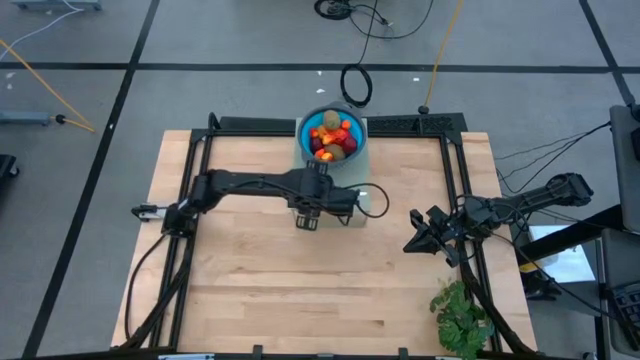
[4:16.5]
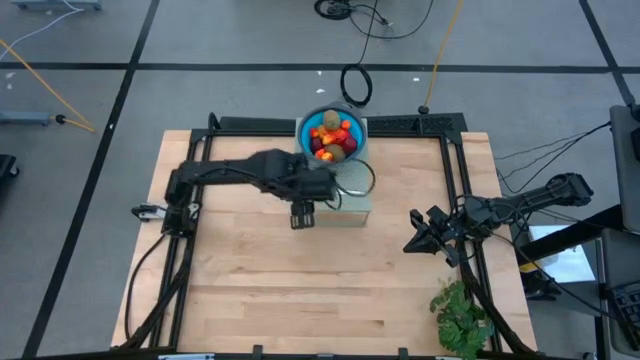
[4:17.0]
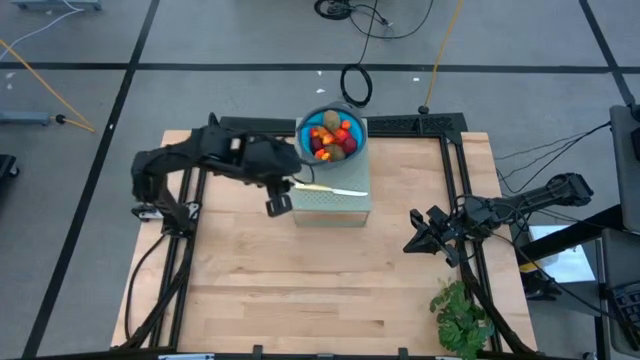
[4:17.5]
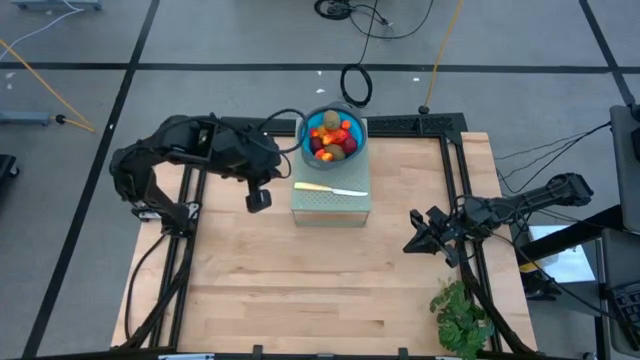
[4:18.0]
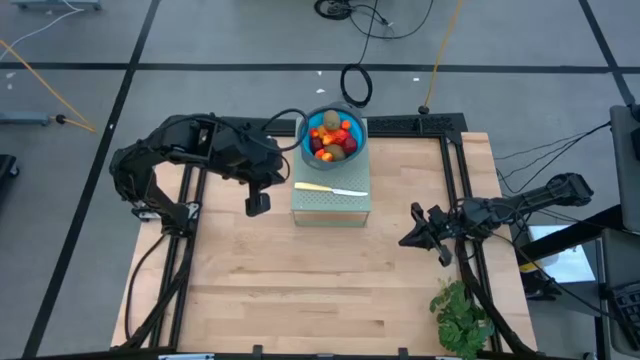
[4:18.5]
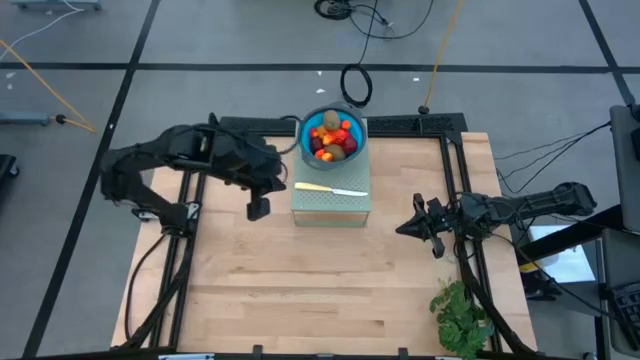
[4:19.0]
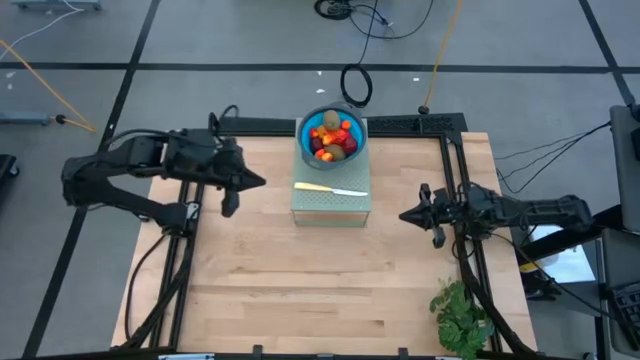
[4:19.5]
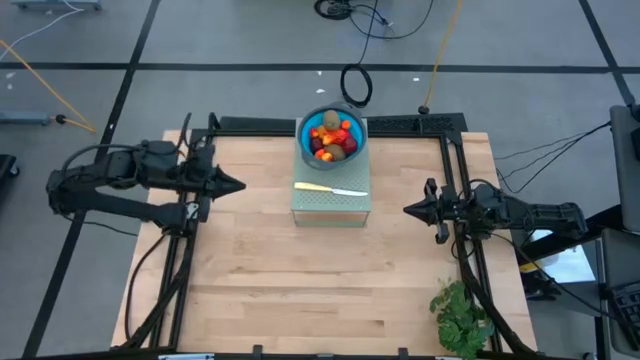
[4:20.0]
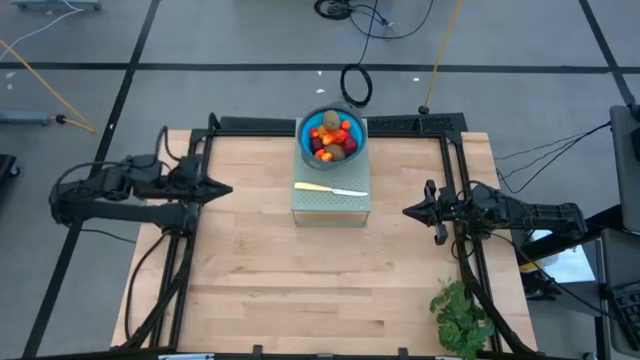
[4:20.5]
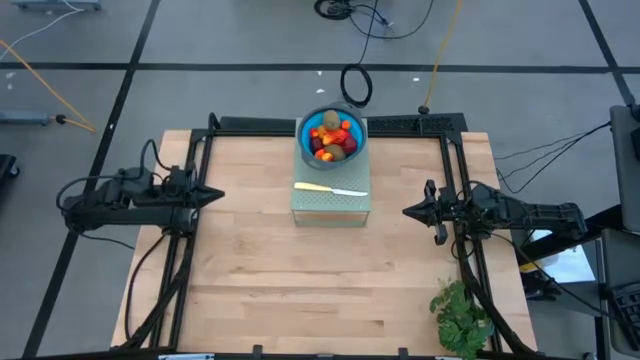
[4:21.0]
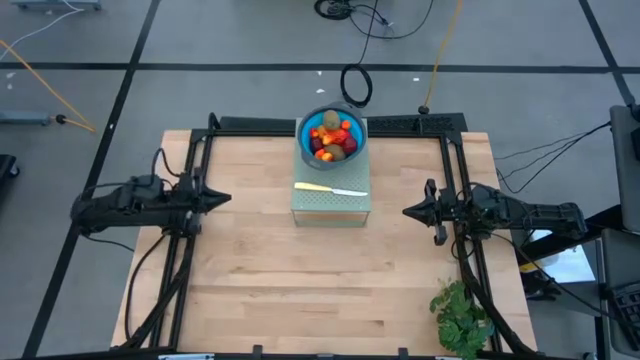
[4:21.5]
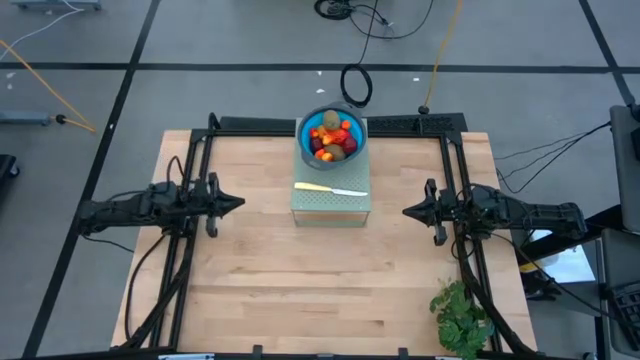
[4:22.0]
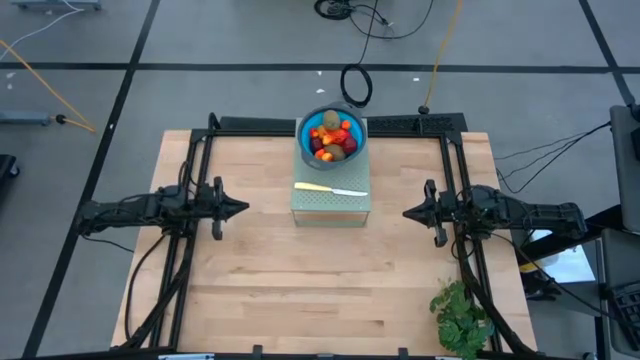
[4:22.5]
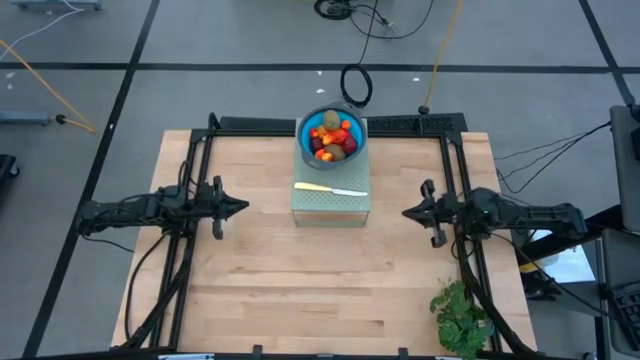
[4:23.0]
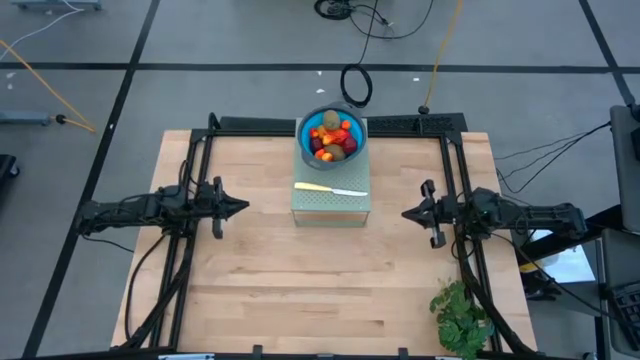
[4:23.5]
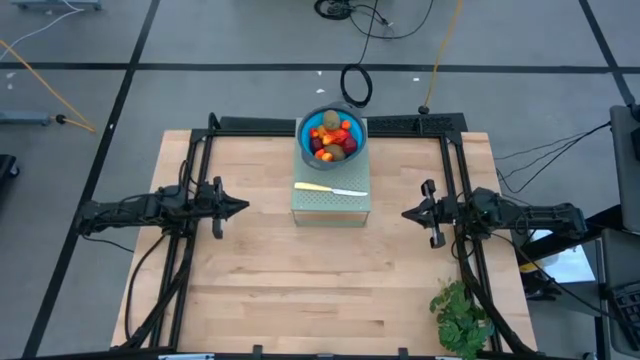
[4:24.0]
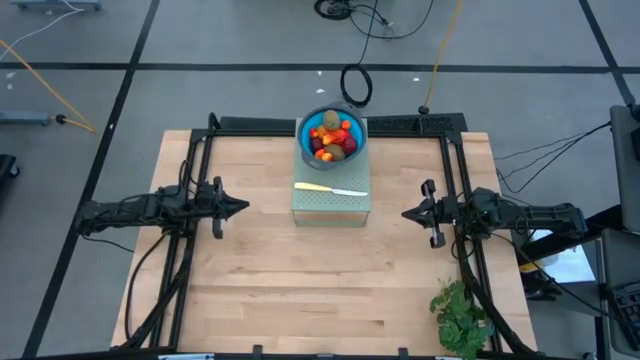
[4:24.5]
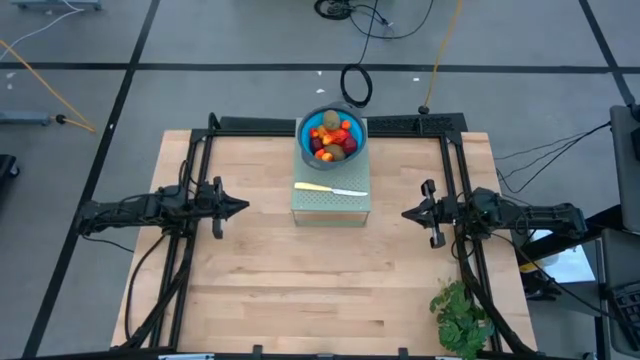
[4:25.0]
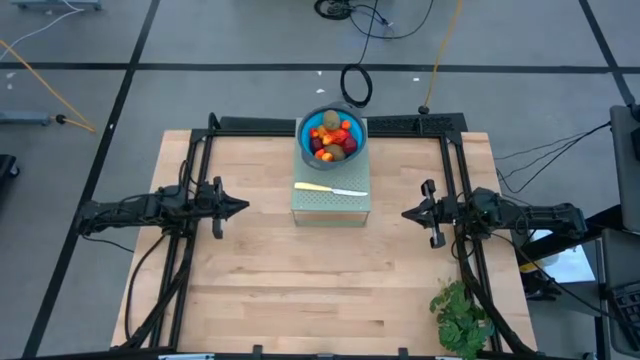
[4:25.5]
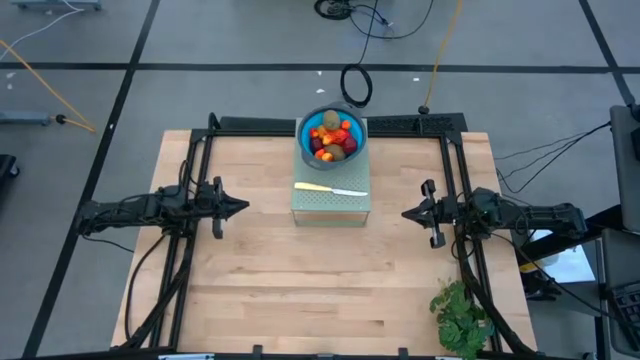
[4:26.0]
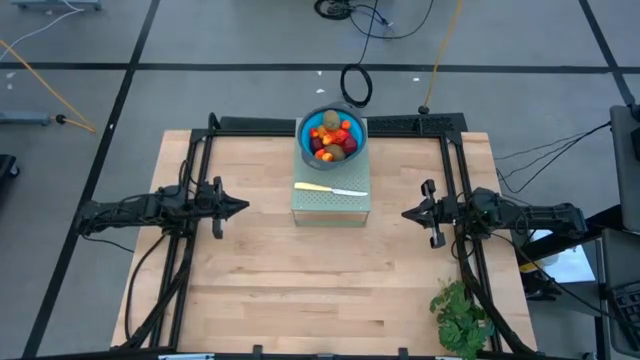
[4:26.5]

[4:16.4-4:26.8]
Task: Pick & Place Fruit
Return to Home Position

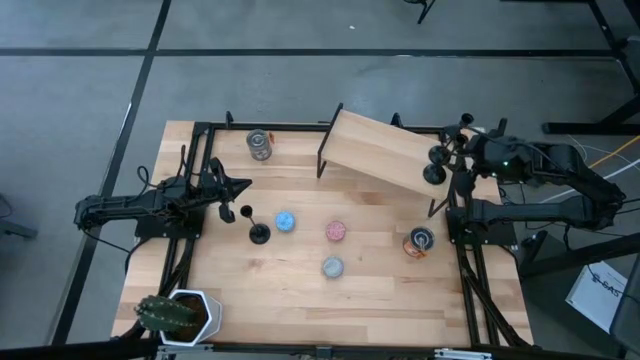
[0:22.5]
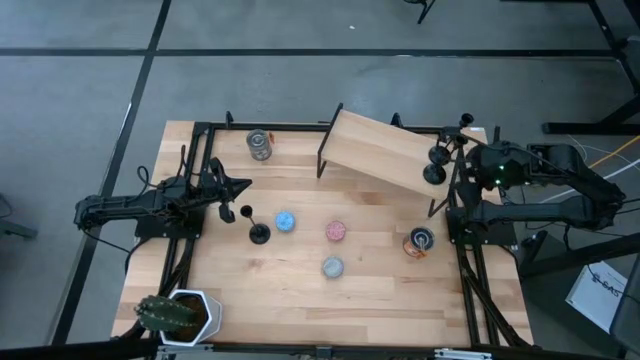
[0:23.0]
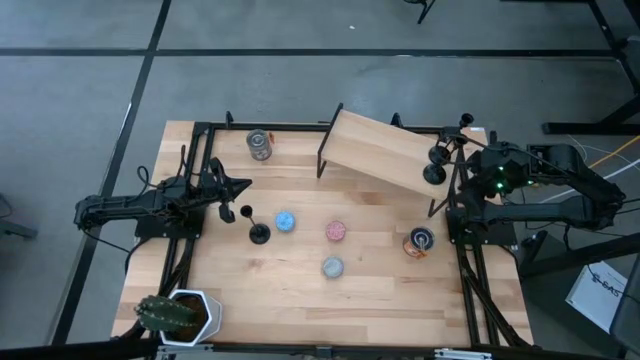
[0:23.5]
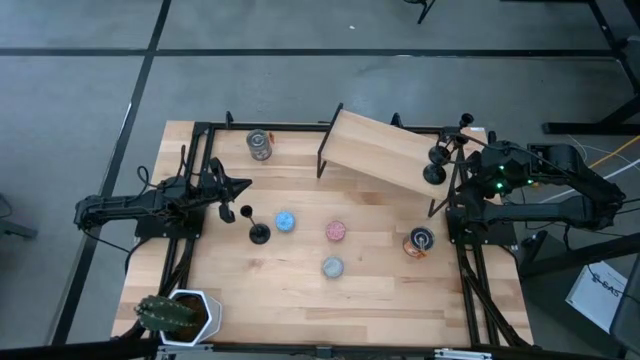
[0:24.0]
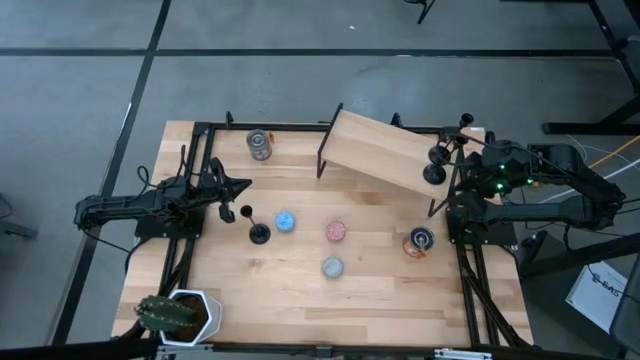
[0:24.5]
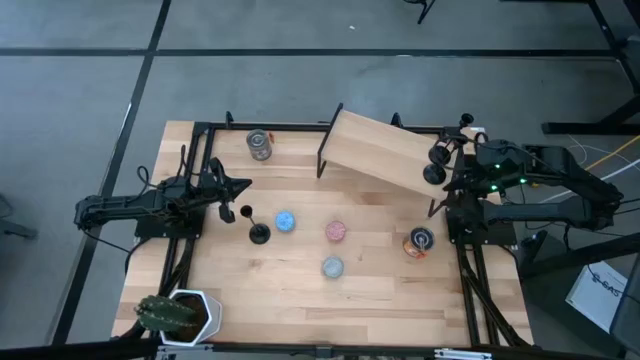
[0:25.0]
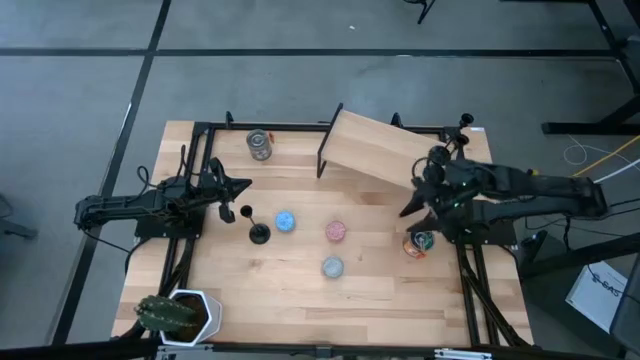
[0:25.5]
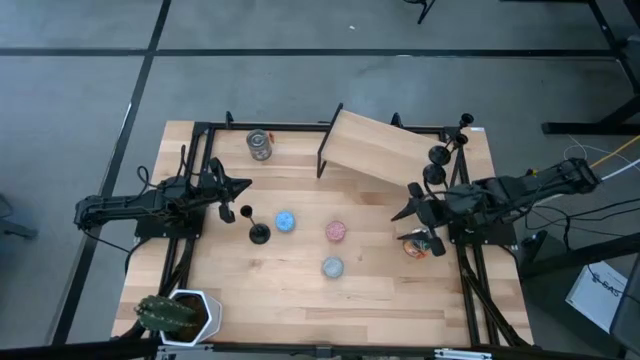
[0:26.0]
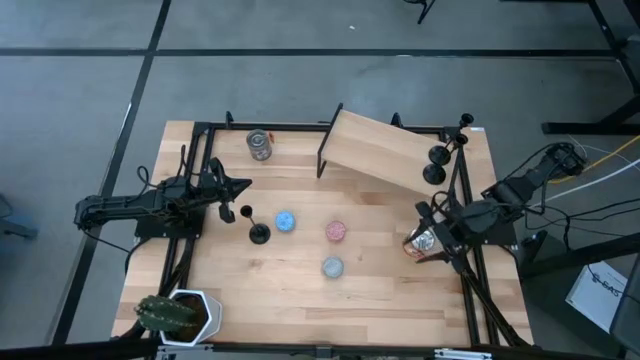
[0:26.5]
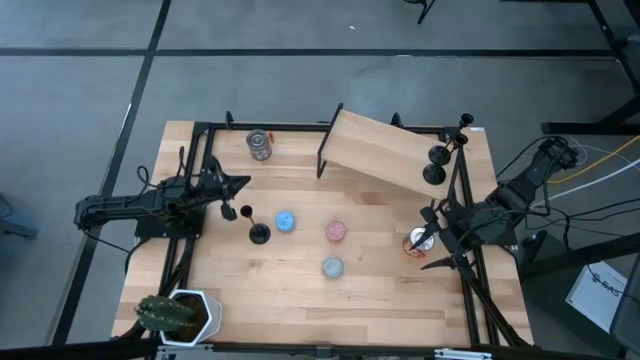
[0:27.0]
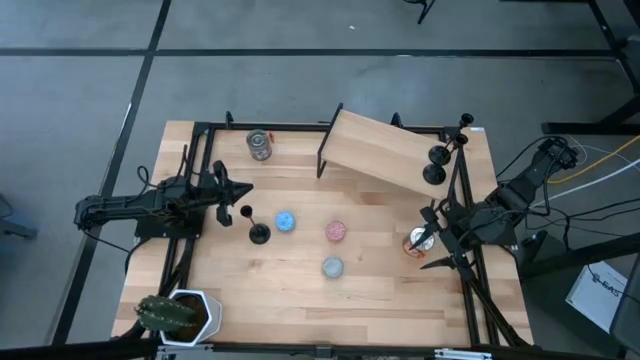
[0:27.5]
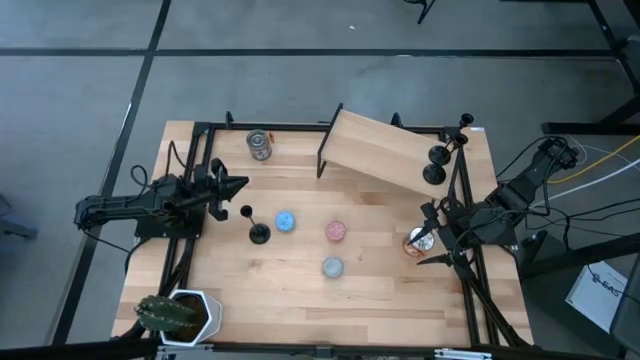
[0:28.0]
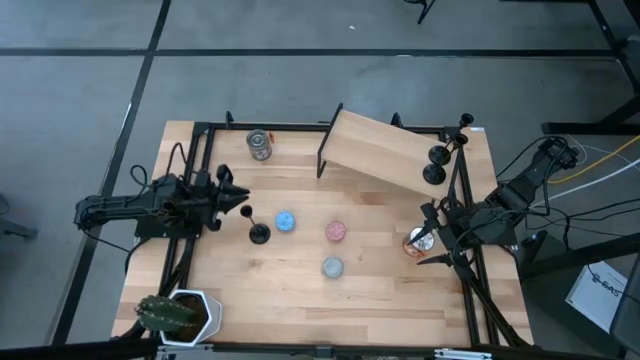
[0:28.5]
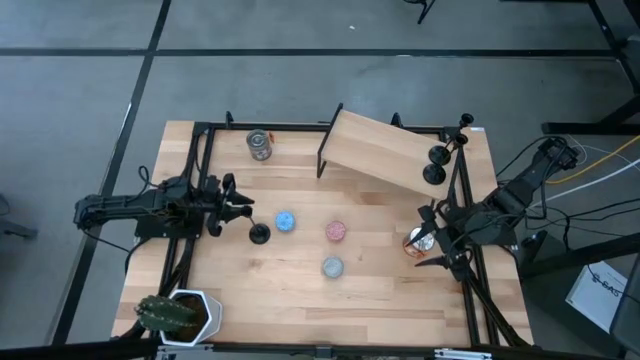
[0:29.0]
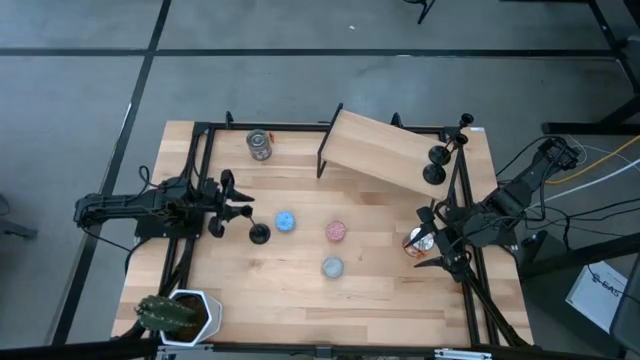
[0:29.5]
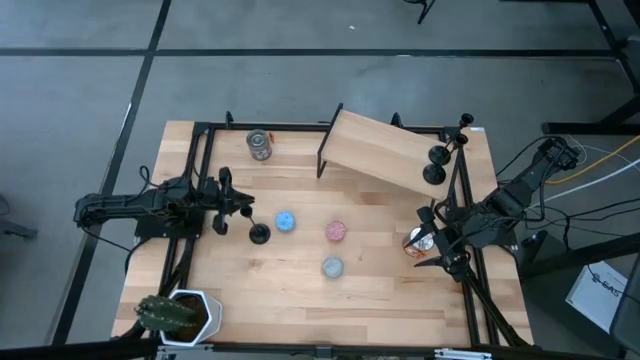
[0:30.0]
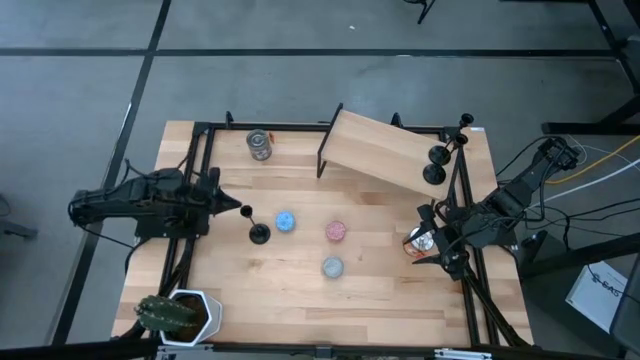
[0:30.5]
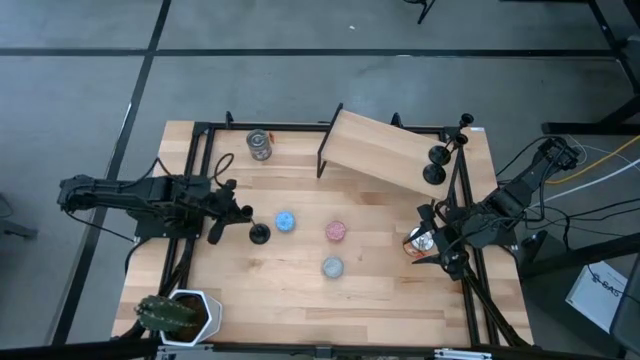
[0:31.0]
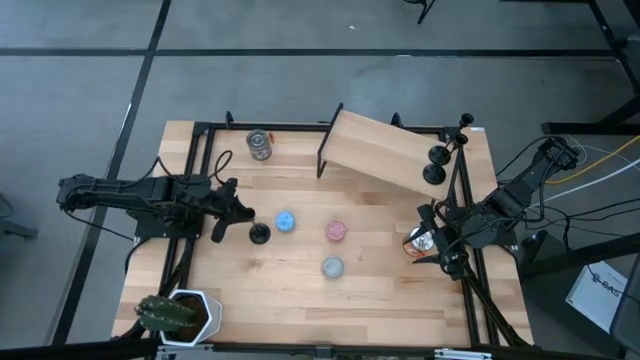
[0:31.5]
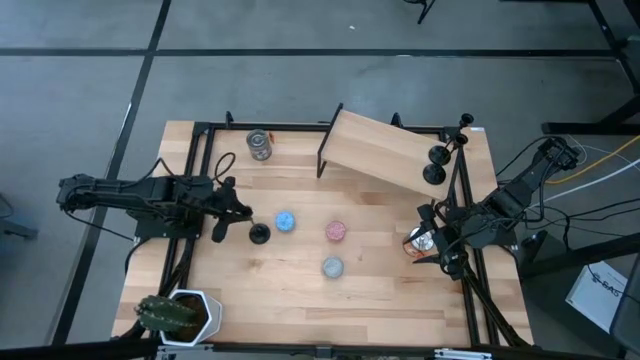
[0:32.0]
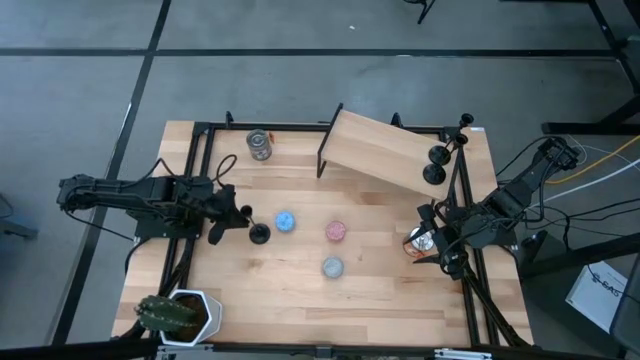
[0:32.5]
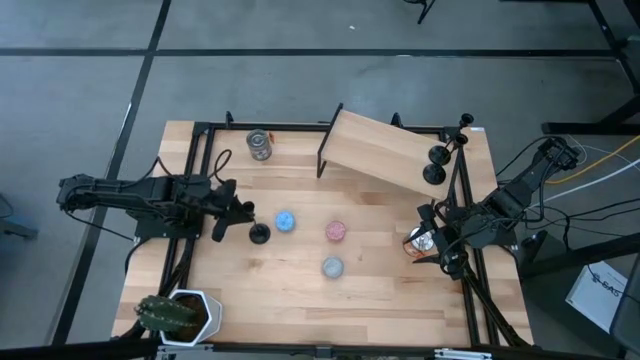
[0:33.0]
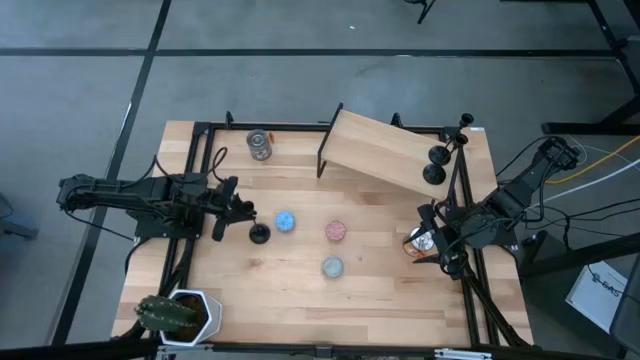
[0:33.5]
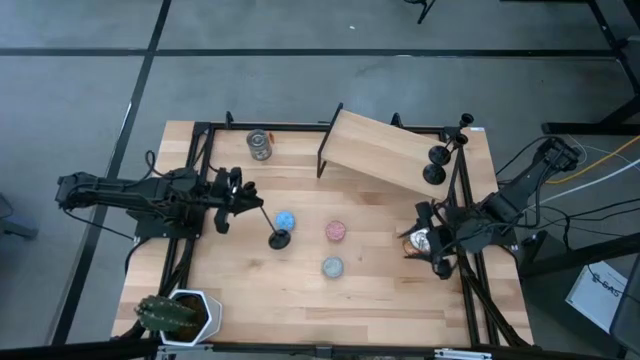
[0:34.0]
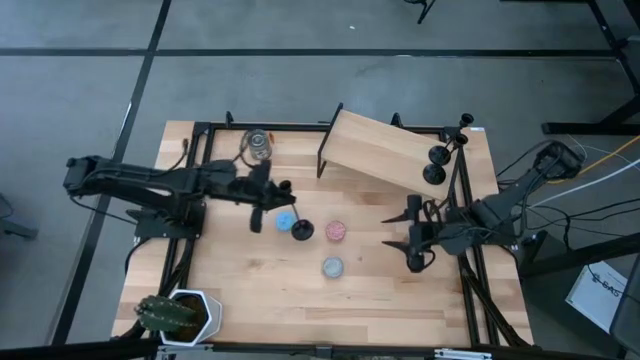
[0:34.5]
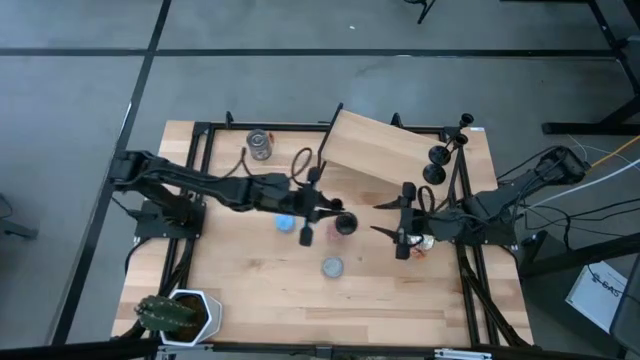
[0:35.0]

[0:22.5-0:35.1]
Task: Pick & Place candle stick holders
Align the black candle holder with the other black candle holder on the shelf
